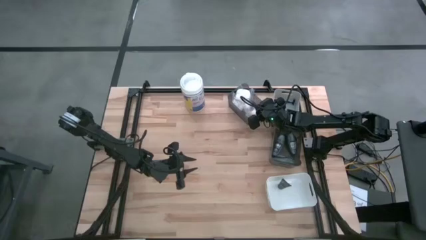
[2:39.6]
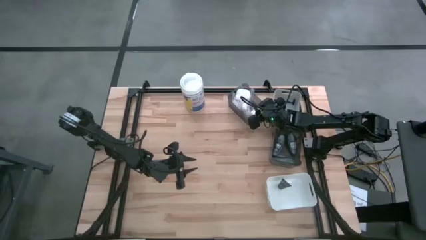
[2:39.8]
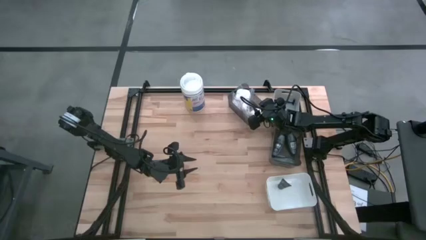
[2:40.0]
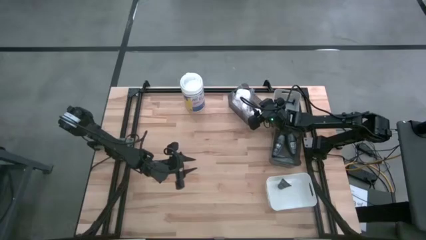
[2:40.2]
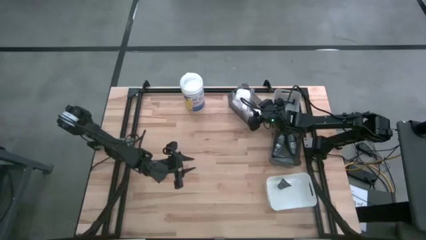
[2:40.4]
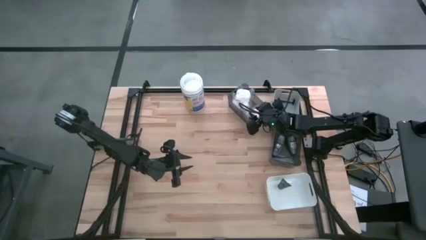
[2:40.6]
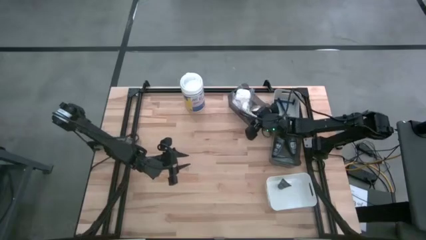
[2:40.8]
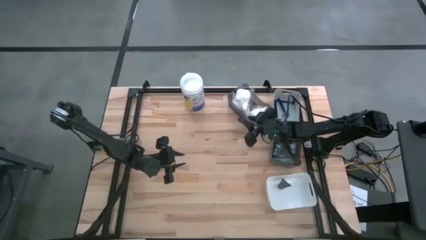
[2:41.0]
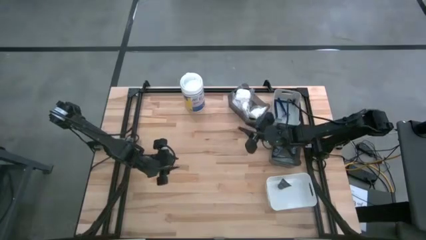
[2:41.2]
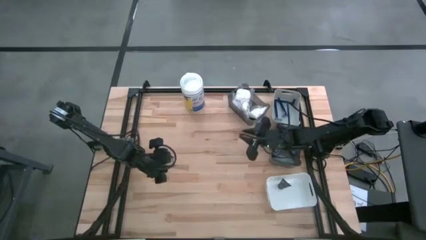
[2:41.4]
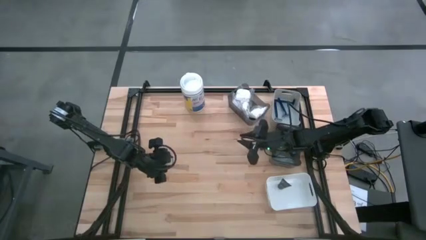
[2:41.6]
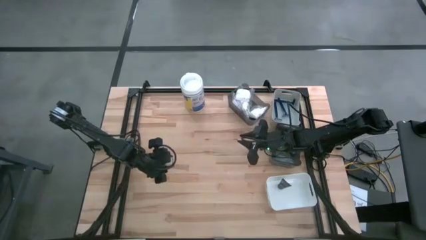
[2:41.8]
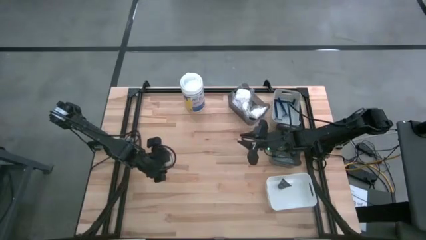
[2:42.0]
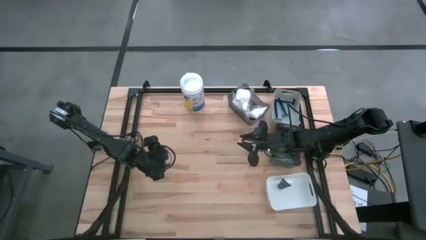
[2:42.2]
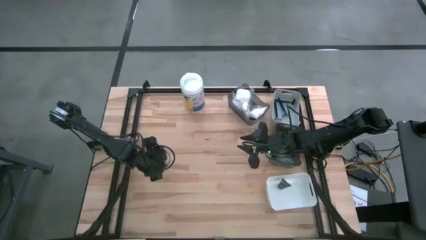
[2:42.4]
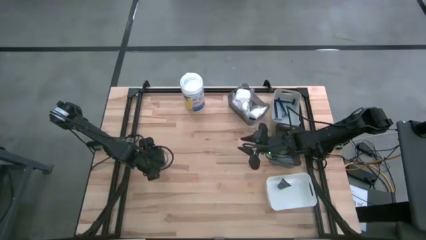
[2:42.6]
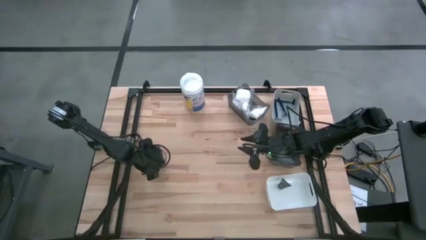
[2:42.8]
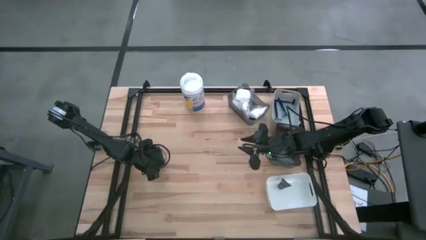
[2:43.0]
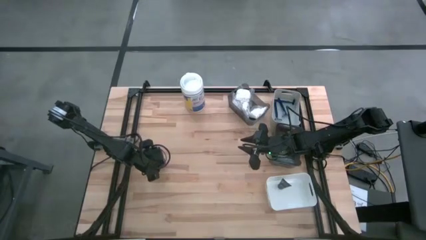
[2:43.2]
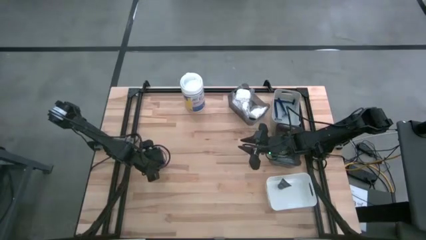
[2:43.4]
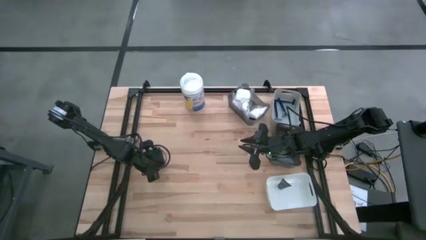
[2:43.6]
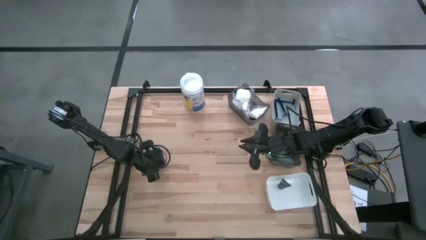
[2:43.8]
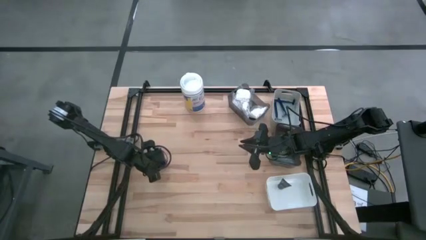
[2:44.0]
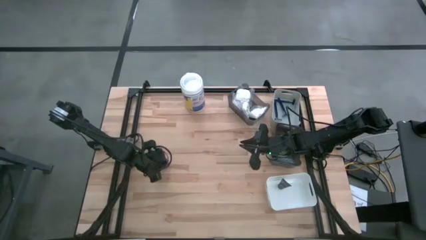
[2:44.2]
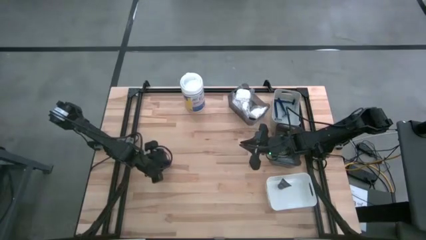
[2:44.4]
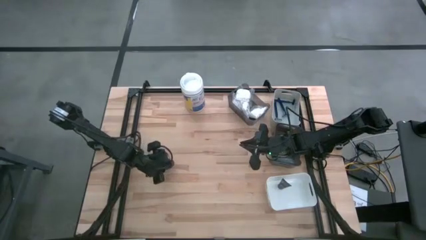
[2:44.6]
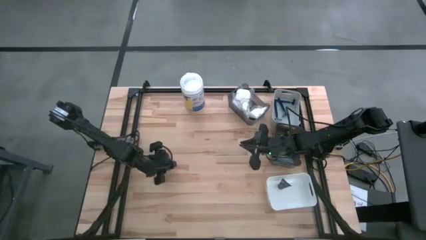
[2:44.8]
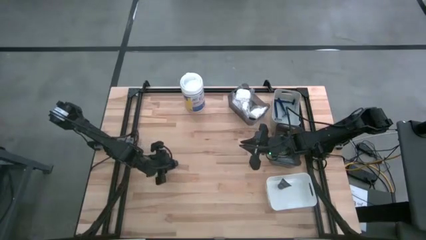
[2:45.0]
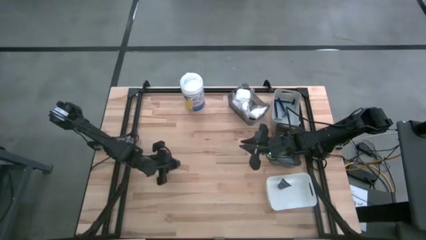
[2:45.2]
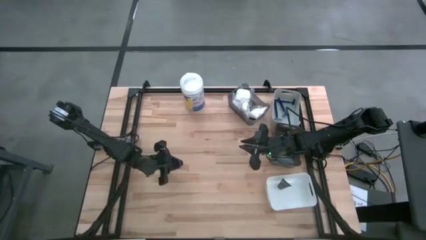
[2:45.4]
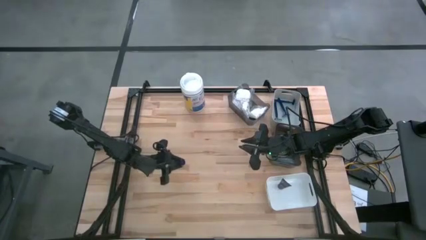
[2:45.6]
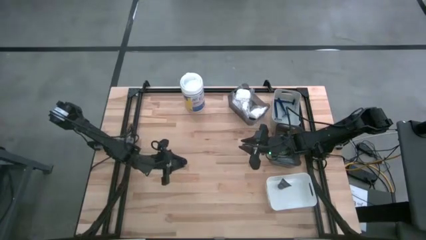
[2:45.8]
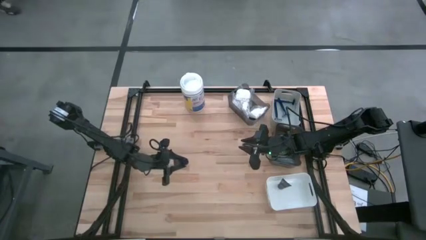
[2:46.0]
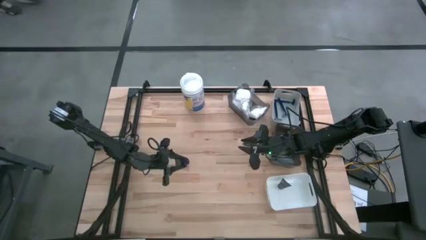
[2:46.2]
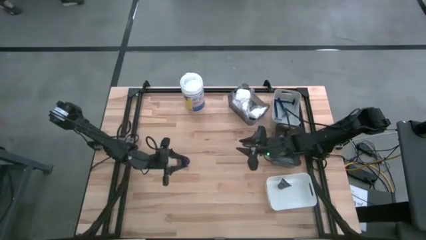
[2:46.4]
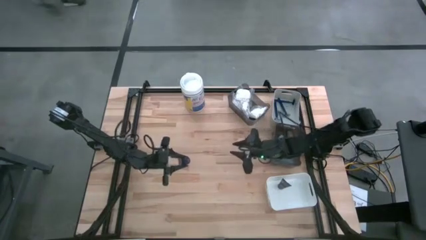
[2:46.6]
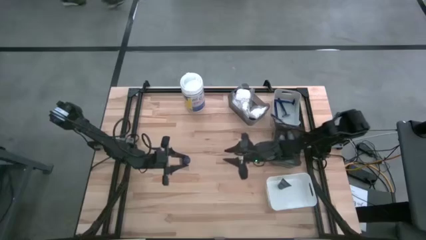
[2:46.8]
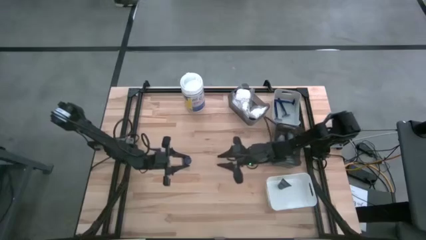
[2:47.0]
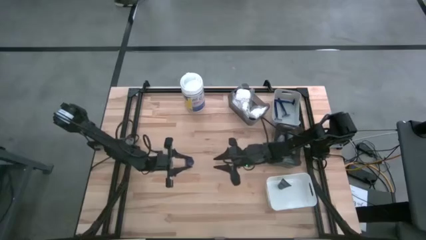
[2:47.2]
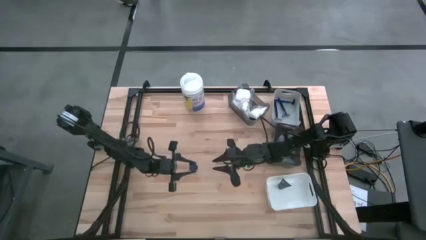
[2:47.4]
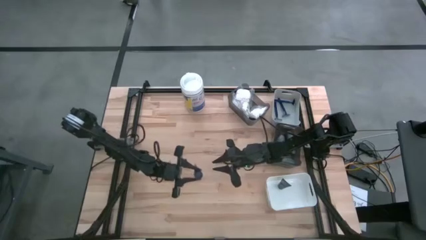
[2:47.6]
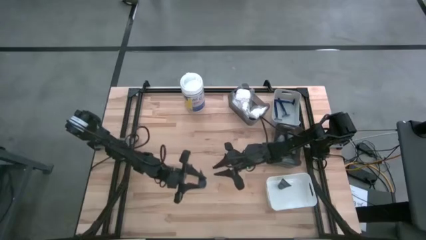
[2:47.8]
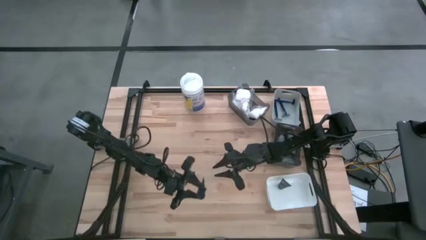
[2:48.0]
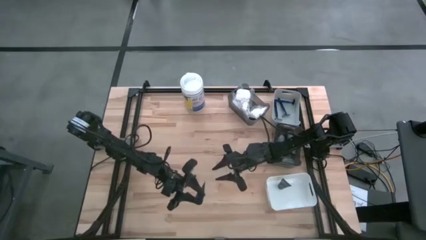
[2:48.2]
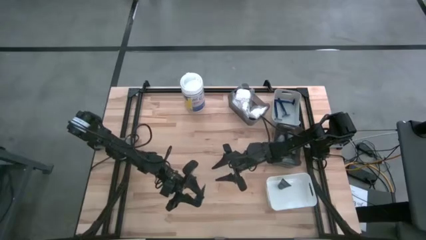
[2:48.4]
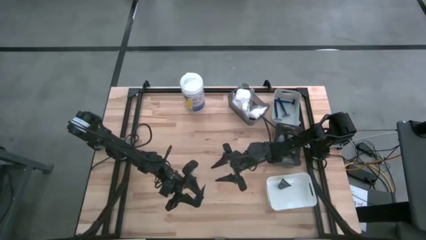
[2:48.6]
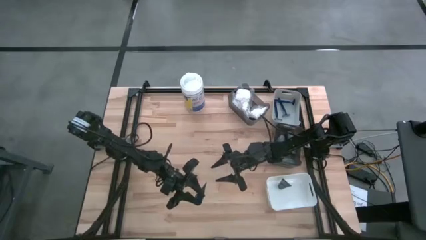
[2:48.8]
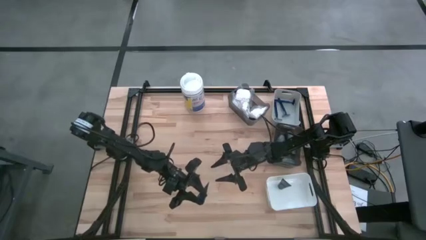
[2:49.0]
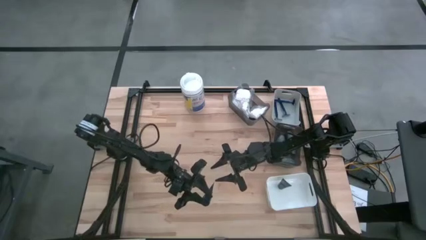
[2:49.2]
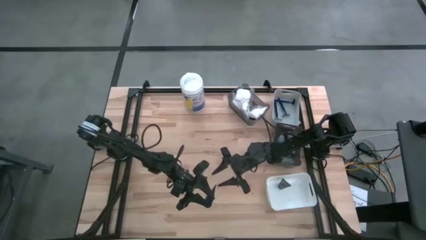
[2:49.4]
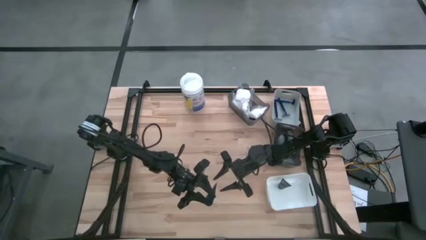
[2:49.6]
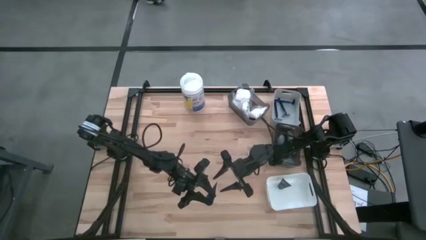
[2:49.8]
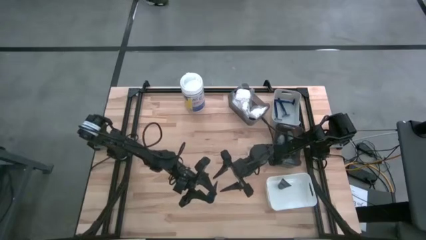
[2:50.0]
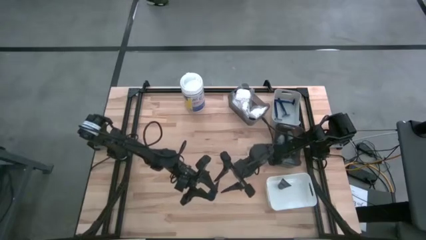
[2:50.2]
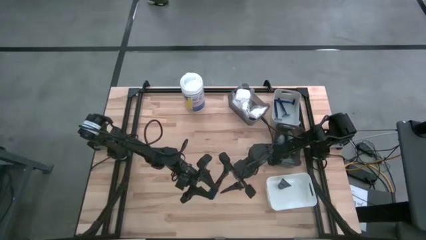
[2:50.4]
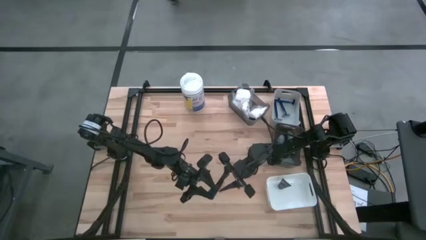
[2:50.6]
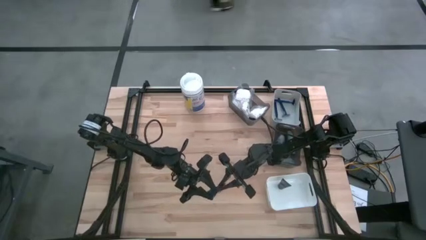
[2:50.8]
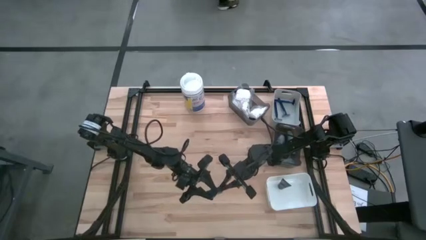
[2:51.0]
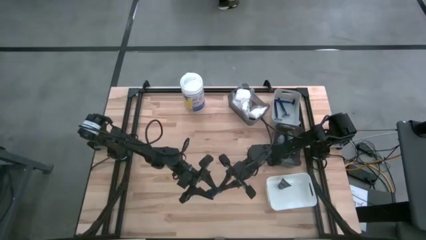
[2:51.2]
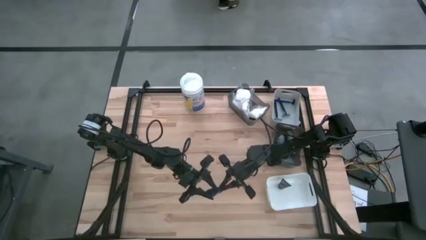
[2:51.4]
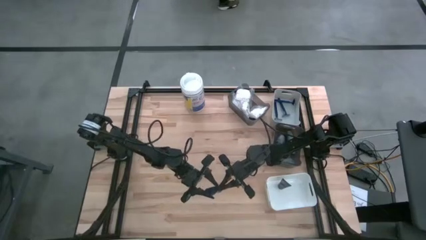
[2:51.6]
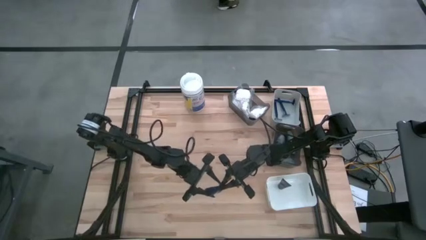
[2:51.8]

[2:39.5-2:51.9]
Task: Pick & Place Travel size toiletries
Put the blue shave cream into the white bin

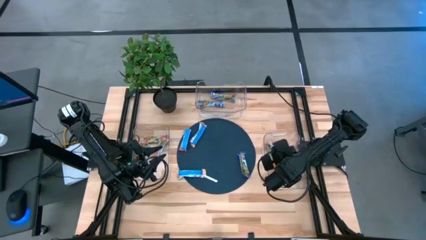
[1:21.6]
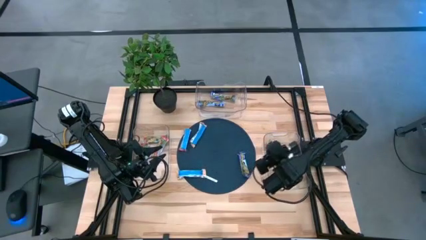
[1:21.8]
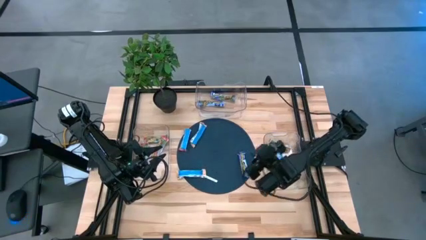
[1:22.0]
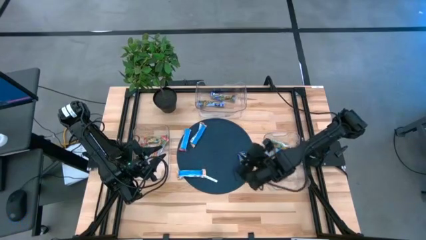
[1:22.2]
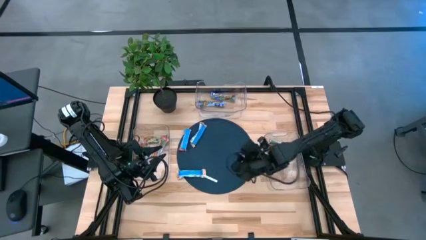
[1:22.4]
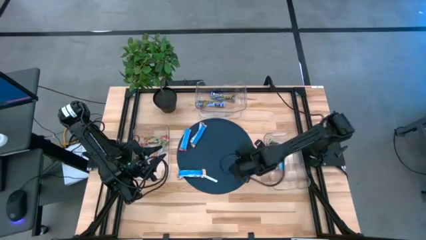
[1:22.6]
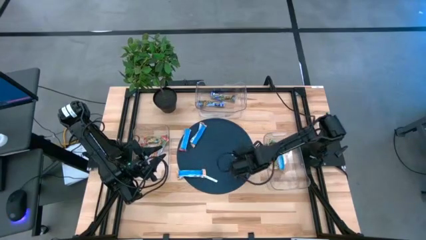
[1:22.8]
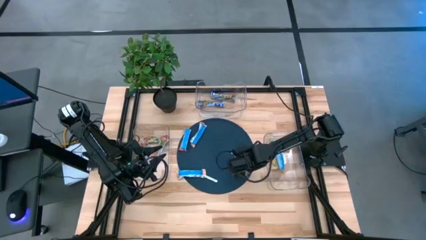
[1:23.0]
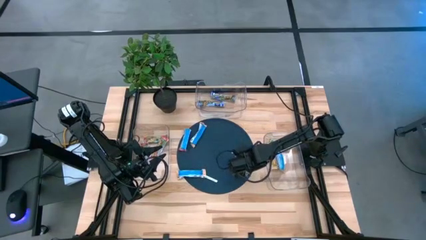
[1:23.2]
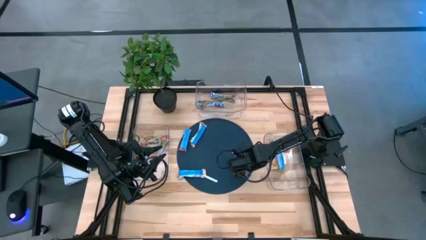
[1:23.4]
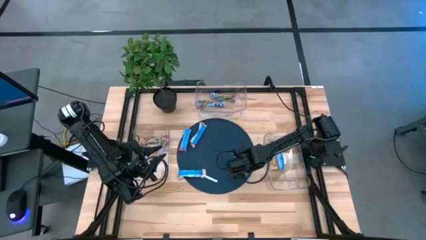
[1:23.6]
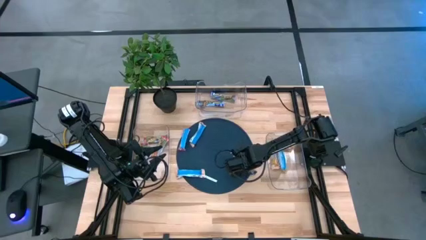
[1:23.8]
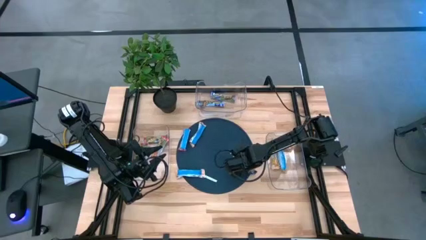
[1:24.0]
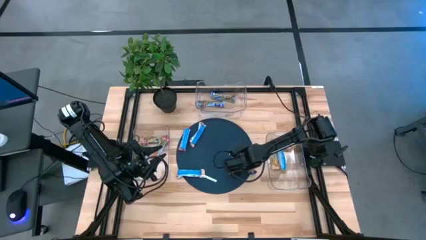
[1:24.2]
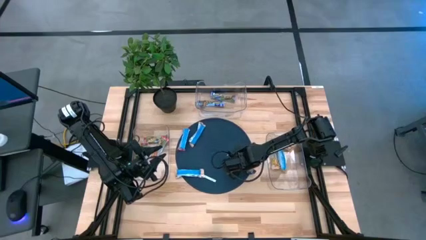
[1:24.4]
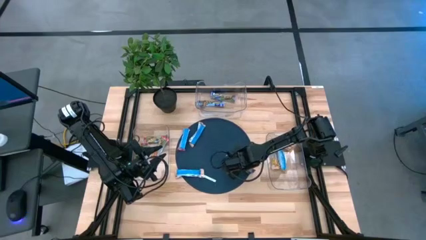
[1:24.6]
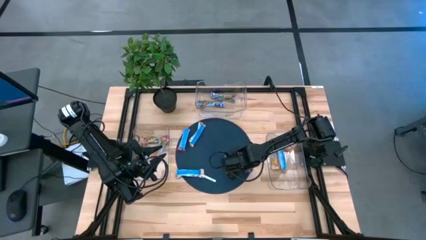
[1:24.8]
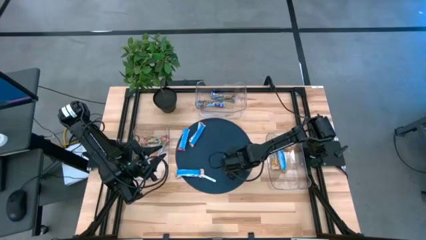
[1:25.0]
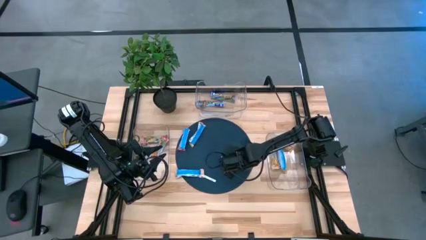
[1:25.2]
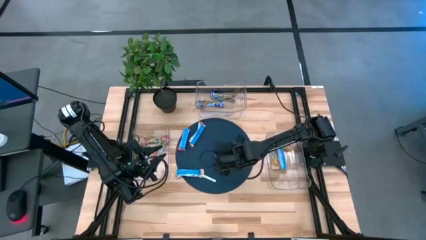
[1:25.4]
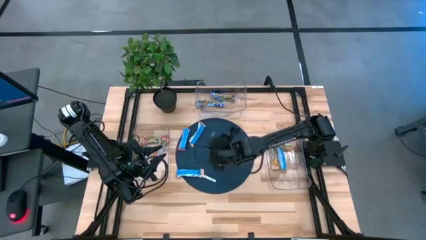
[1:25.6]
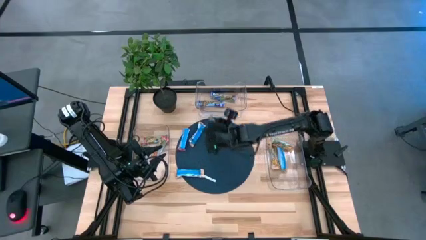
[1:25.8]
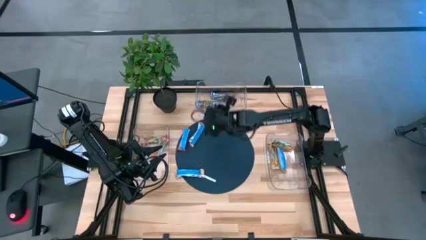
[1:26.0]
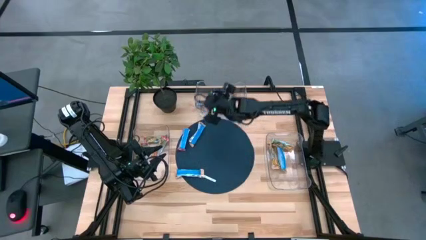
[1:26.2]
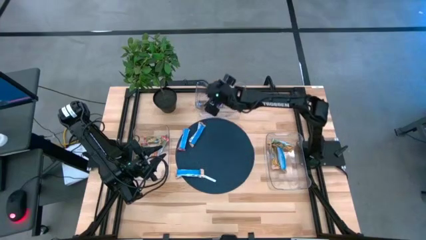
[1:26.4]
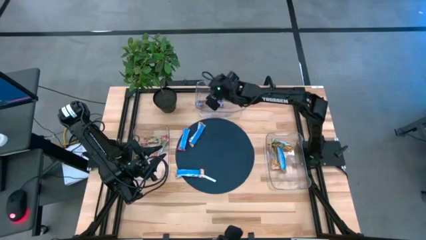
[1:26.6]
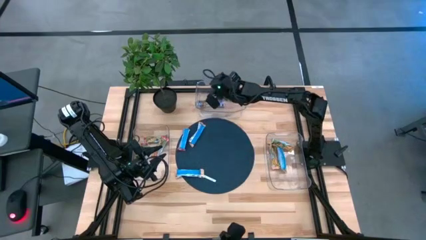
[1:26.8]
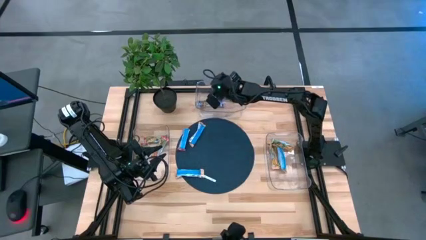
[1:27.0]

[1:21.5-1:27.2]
Task: Pick and place Granola Bars by type
Put the blue granola bar into the top transparent bin
